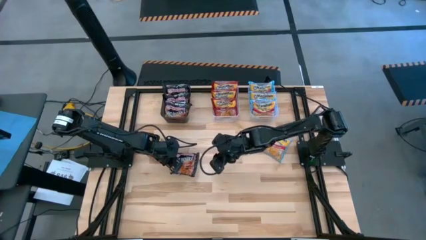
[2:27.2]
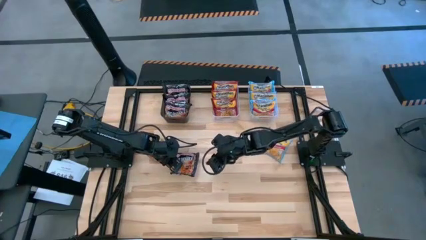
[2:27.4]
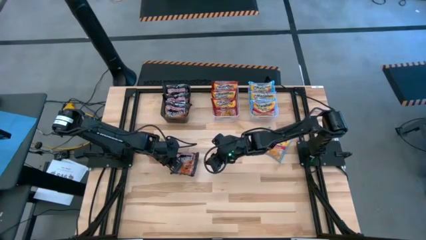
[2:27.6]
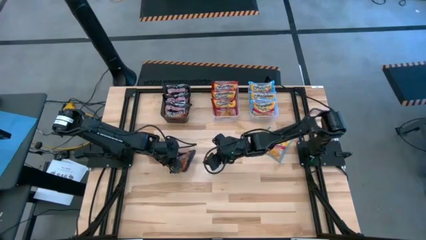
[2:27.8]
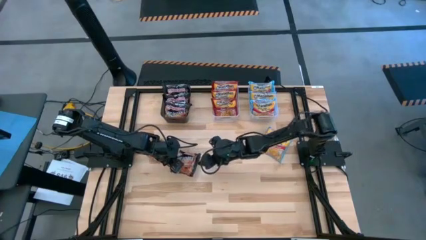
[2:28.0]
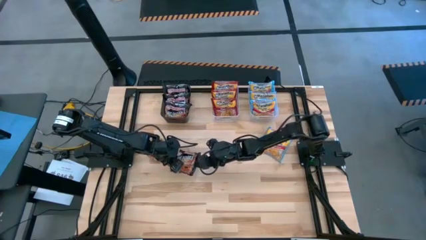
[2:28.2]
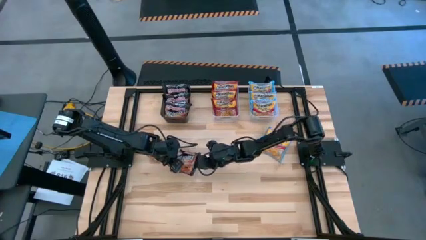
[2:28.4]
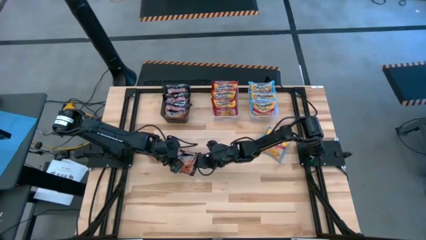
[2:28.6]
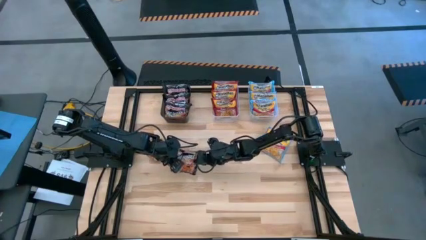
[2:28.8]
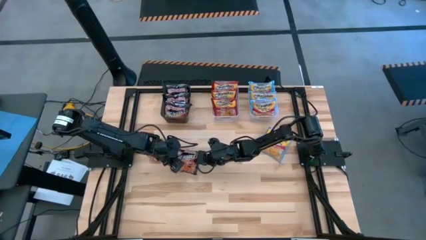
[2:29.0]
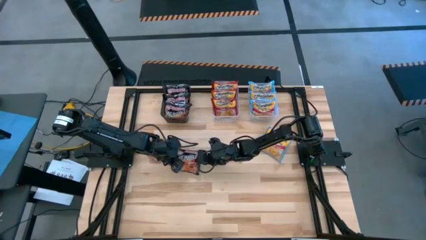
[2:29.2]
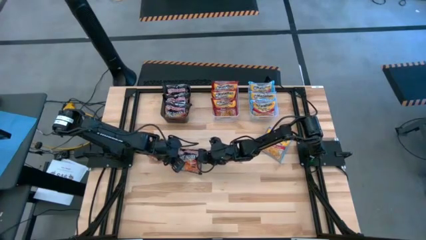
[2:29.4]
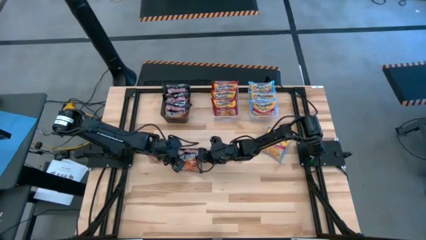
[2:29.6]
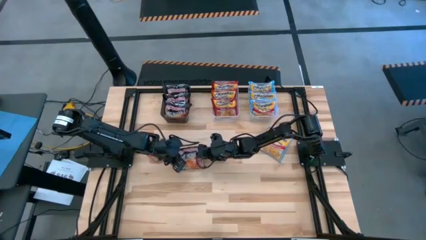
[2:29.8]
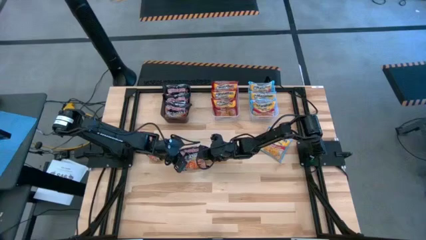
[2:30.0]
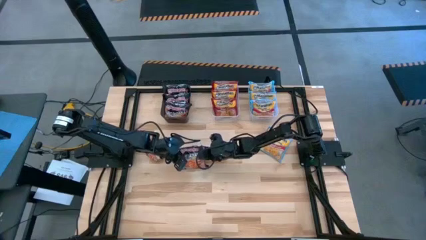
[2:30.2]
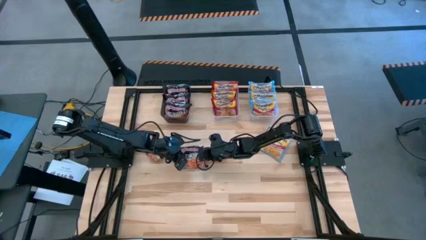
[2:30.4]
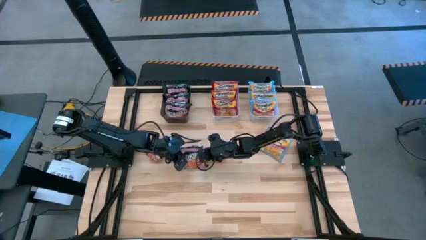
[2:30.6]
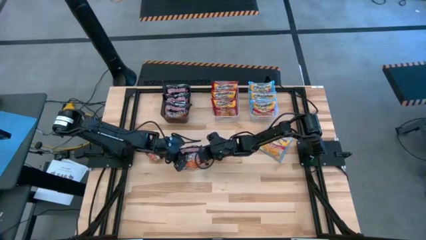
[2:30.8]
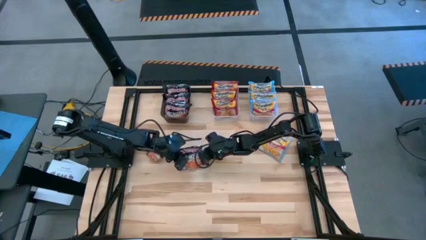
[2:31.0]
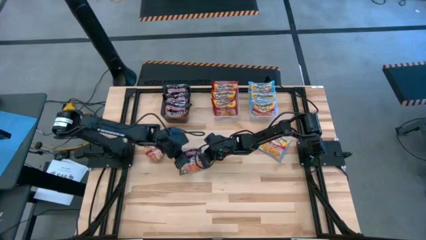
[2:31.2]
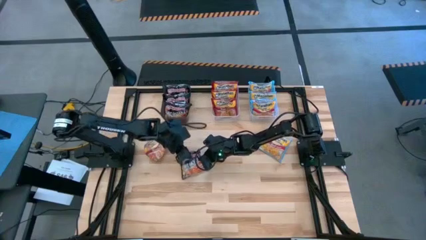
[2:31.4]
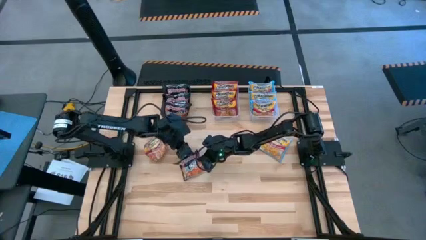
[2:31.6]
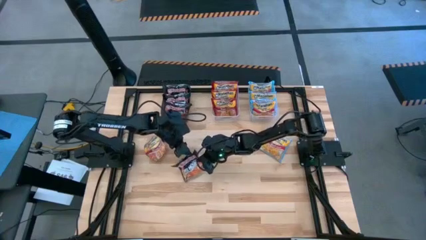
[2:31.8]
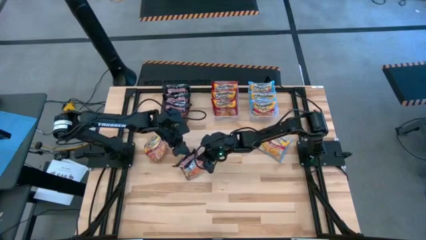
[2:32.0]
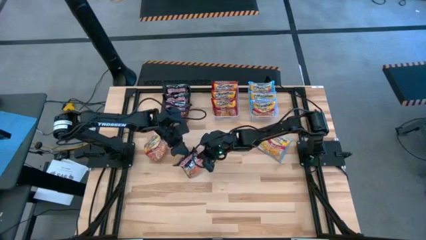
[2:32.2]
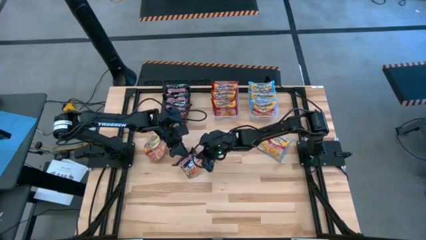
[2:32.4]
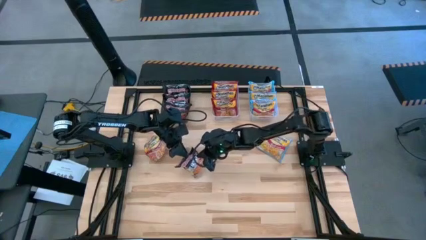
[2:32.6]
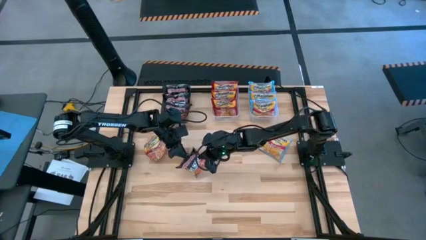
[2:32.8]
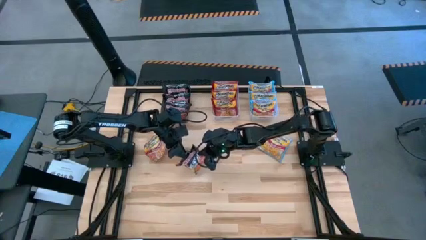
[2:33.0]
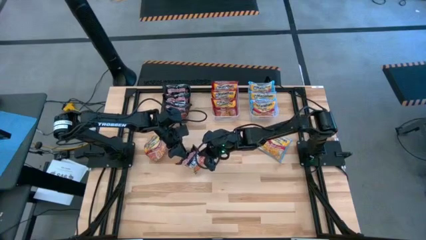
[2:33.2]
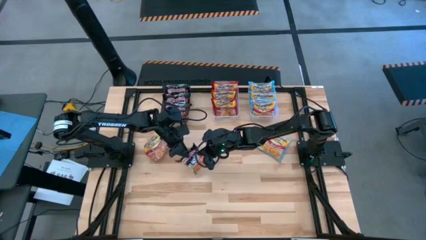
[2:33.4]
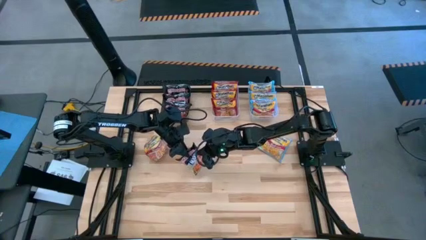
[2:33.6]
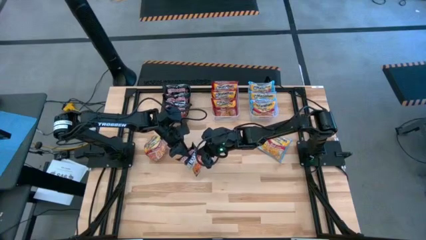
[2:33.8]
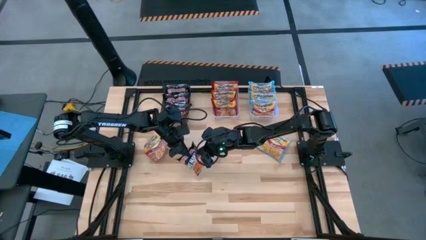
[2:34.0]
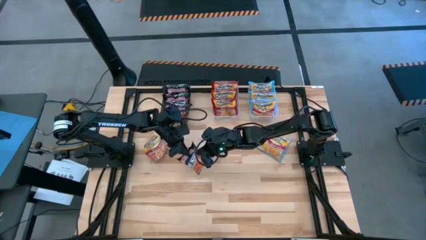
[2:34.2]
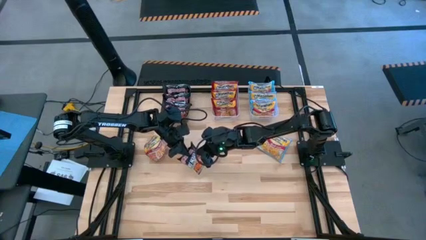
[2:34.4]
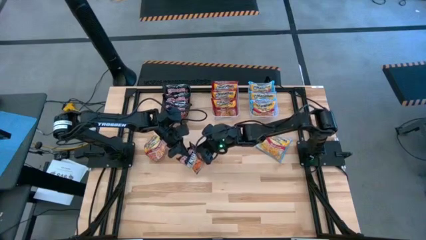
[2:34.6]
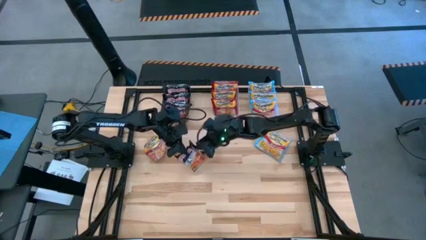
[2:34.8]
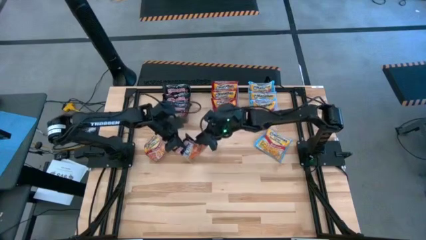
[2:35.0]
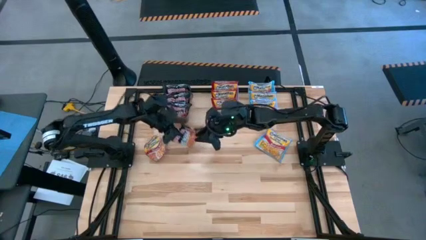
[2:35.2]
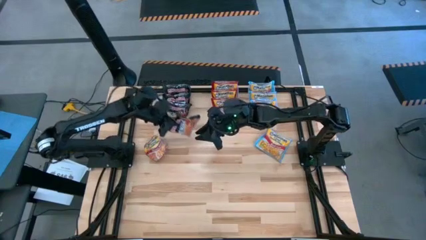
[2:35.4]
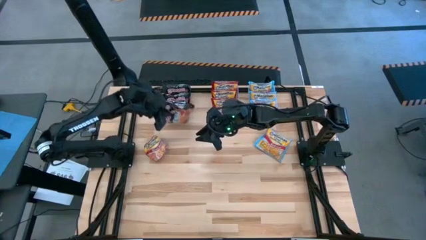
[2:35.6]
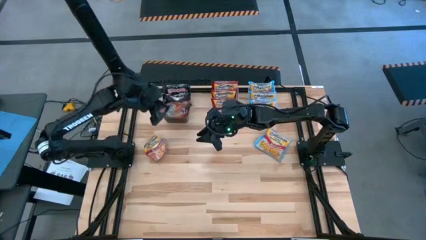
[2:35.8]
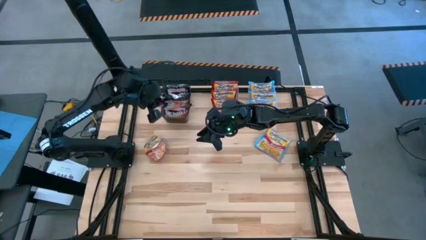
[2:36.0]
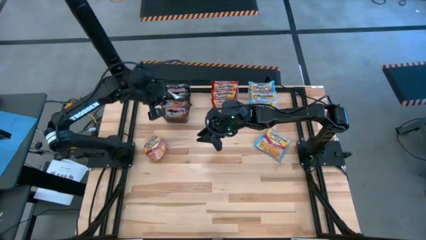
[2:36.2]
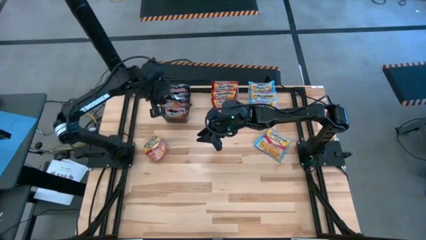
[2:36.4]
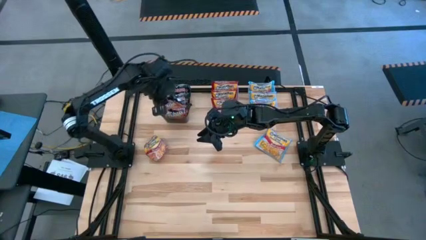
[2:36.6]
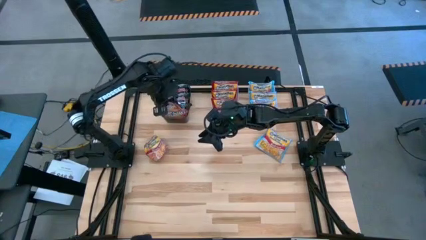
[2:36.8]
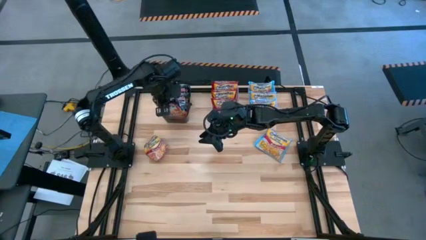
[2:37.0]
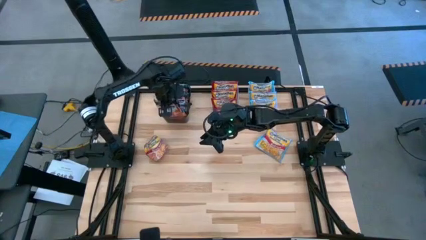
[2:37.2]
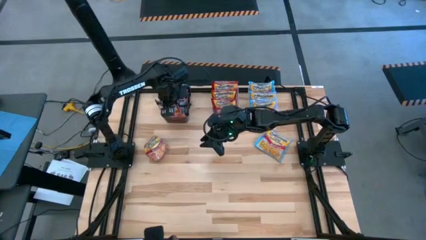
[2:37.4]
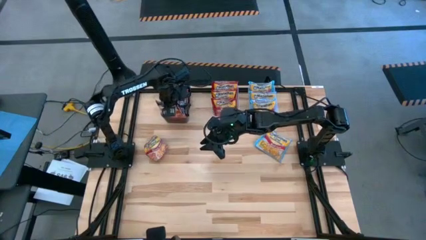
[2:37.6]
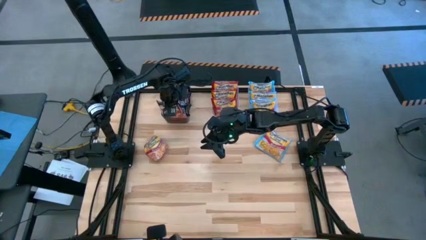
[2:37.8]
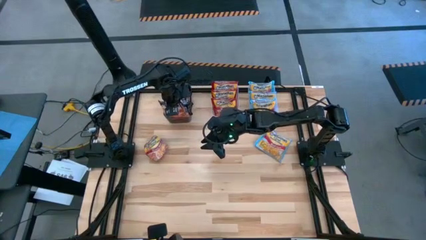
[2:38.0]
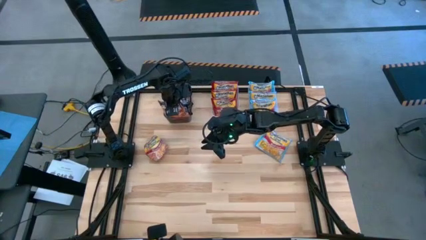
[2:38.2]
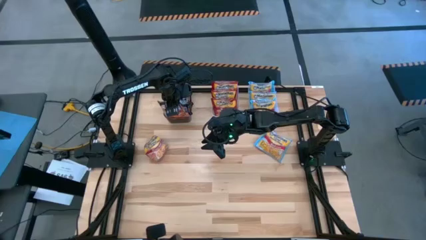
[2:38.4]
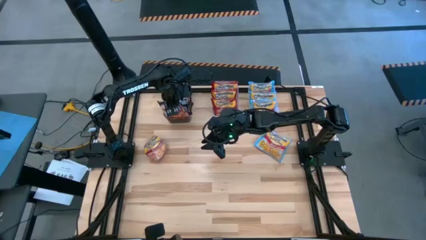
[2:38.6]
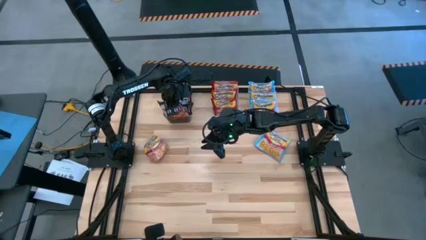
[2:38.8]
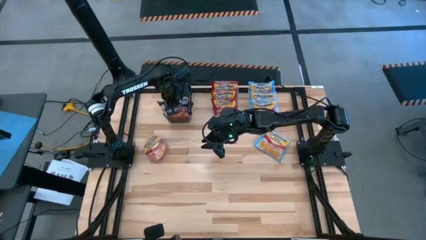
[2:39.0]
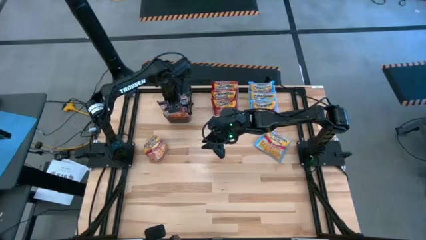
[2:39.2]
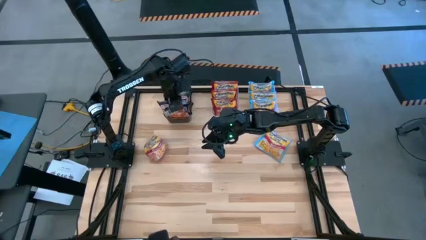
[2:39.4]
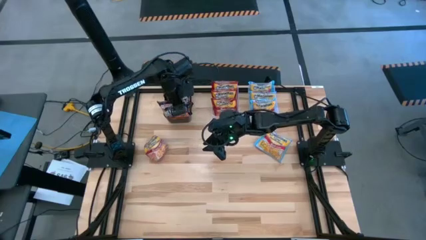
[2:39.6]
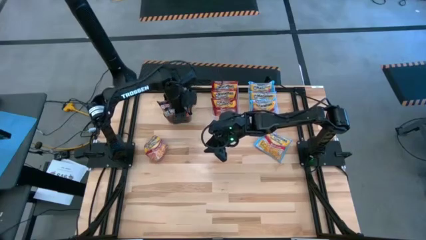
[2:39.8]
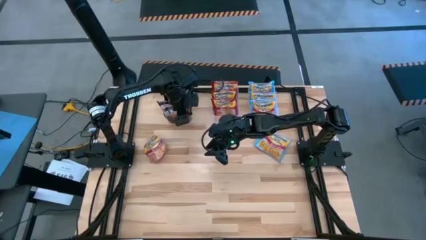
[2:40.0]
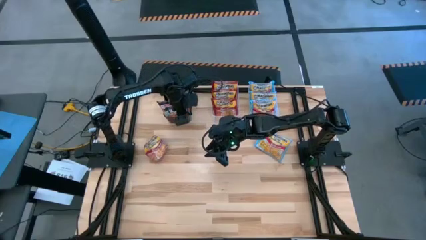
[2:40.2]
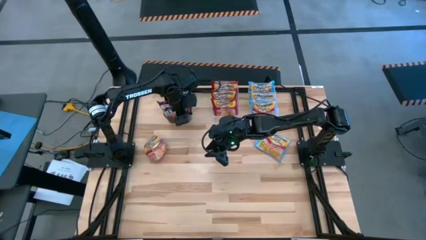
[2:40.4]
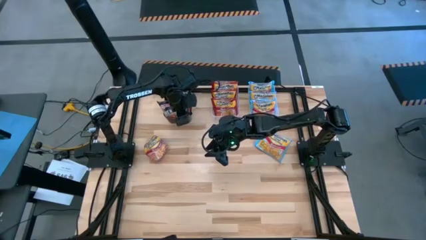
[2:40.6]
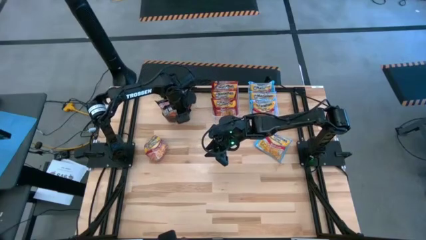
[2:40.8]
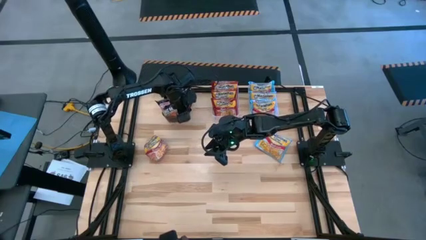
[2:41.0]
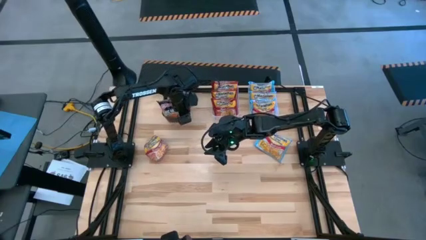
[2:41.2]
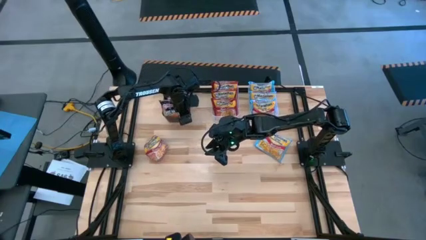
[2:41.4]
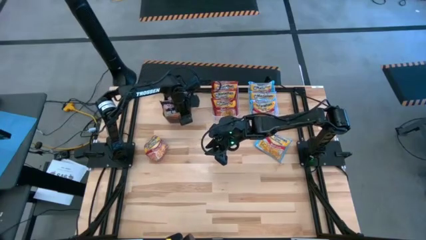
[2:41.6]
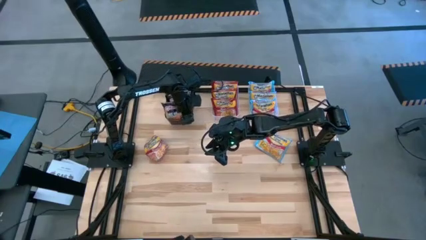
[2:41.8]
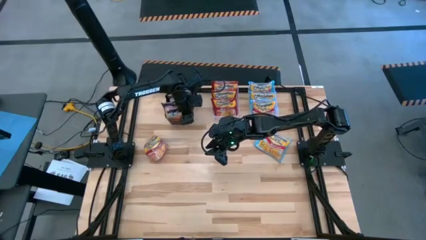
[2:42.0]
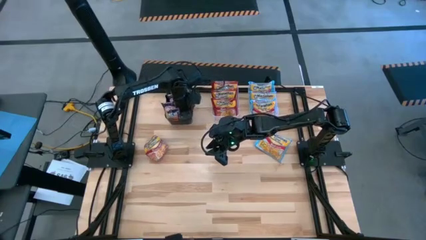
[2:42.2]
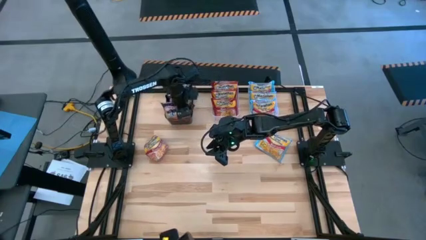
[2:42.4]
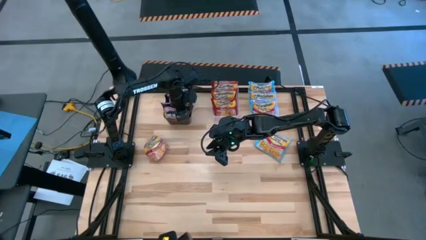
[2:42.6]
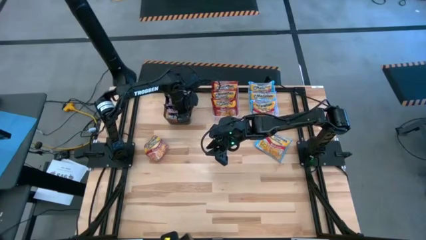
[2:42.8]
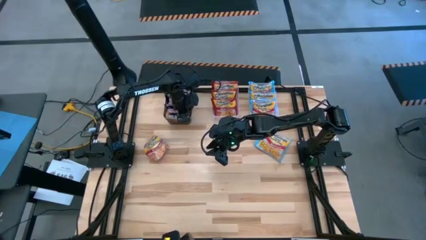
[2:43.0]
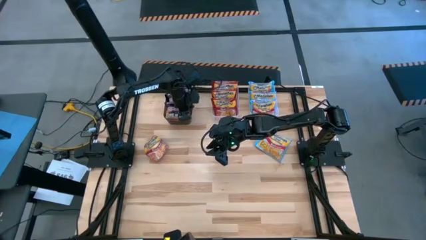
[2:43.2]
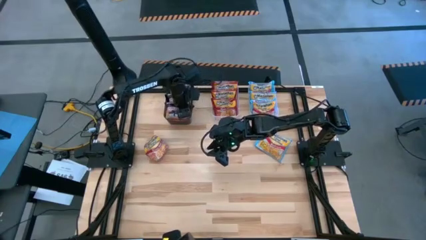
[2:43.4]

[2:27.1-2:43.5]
Task: Sort Maruchan noodles
Put the black noodle pack into the black bin
